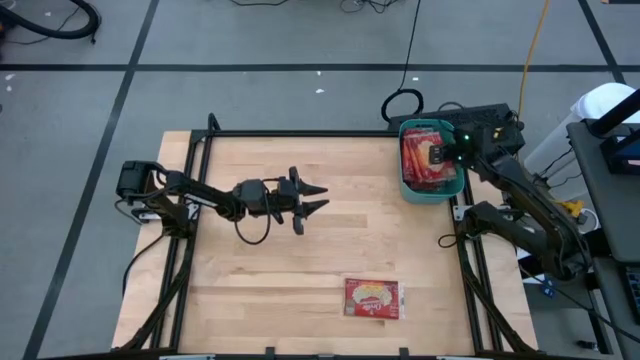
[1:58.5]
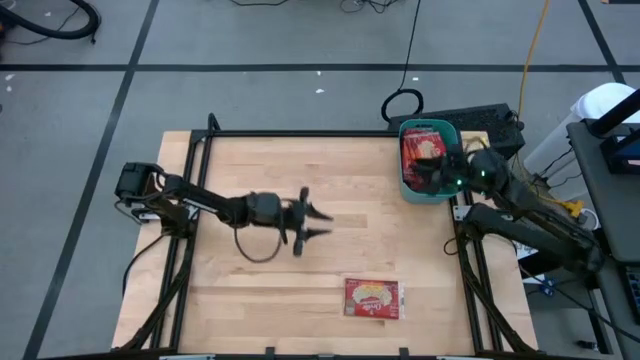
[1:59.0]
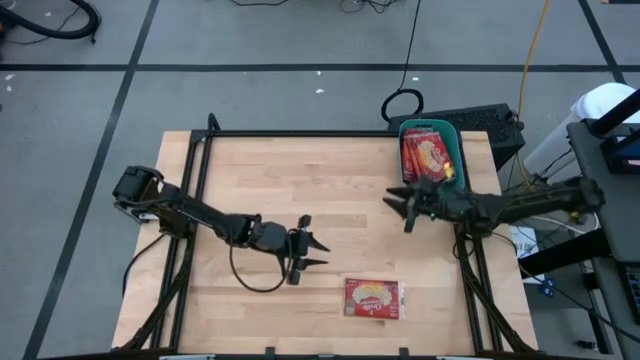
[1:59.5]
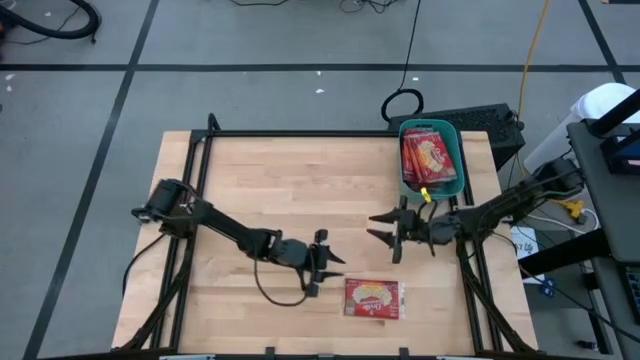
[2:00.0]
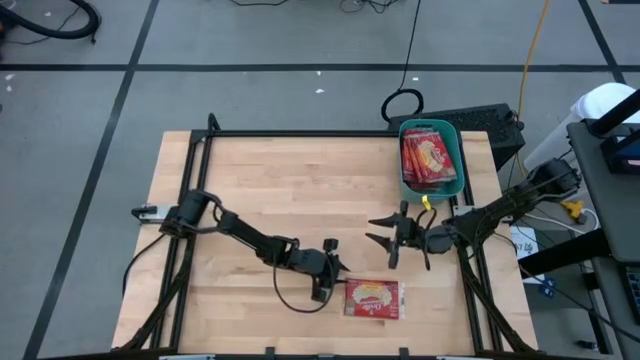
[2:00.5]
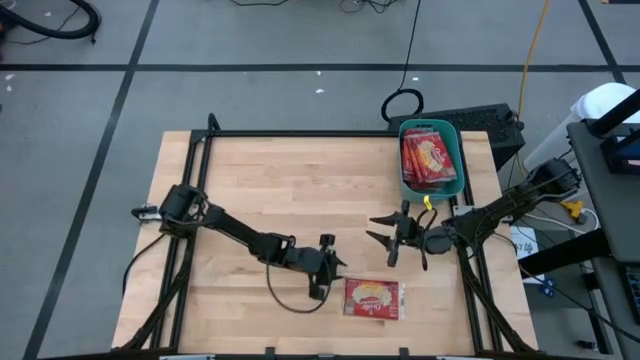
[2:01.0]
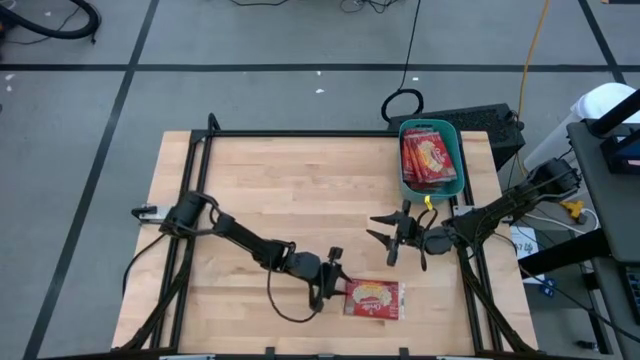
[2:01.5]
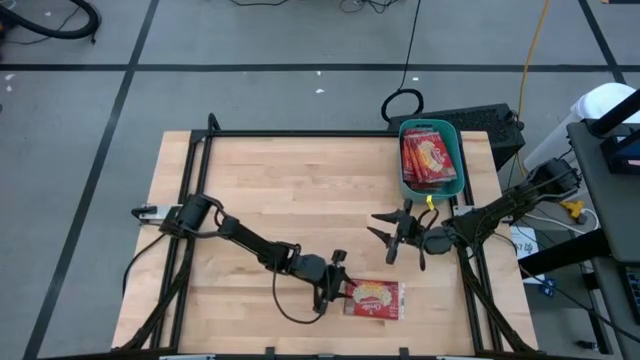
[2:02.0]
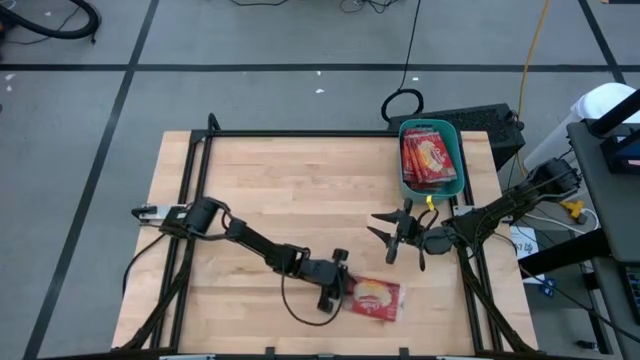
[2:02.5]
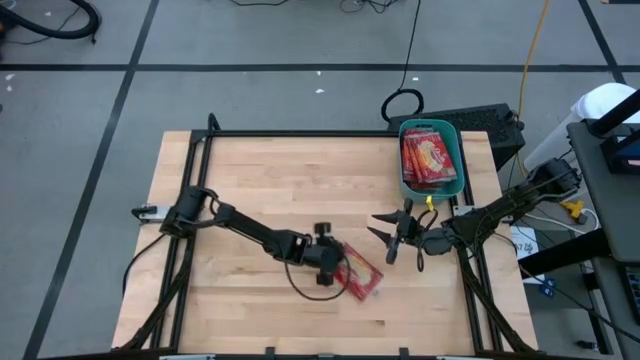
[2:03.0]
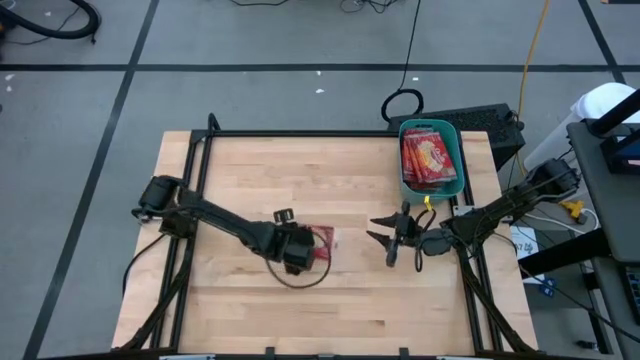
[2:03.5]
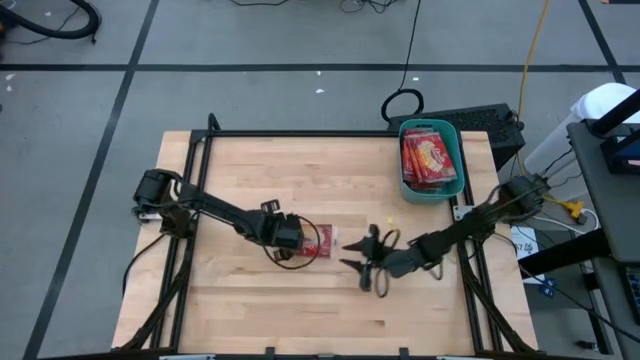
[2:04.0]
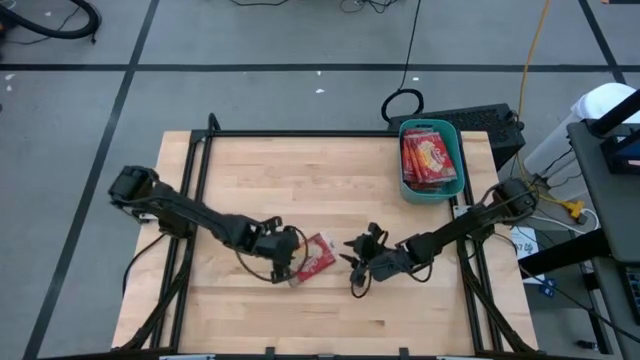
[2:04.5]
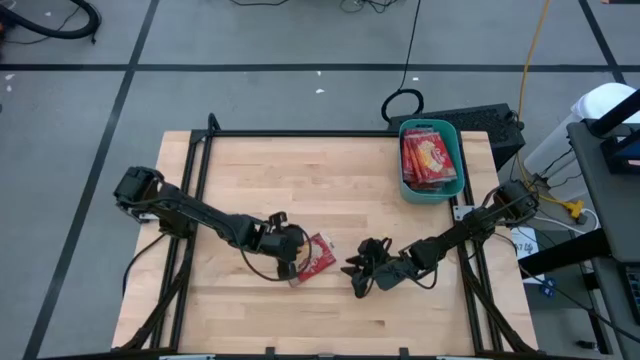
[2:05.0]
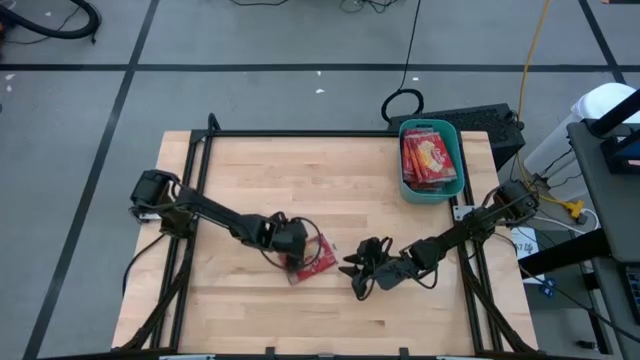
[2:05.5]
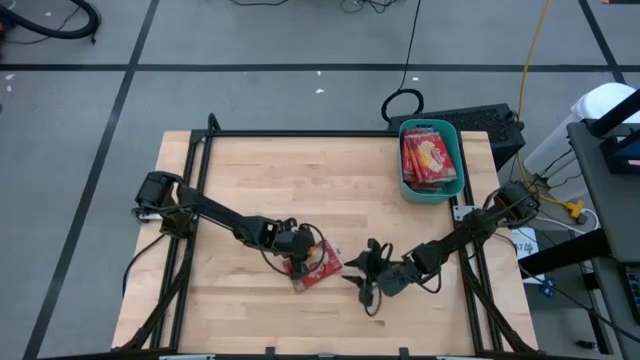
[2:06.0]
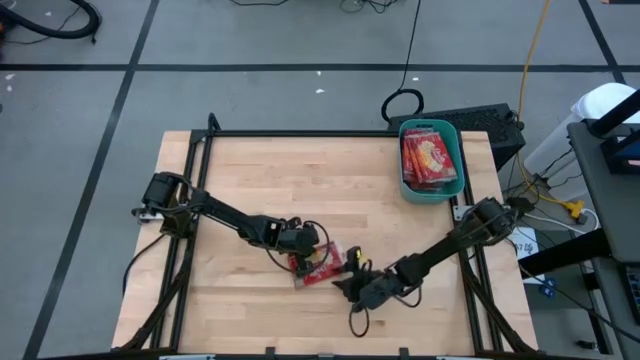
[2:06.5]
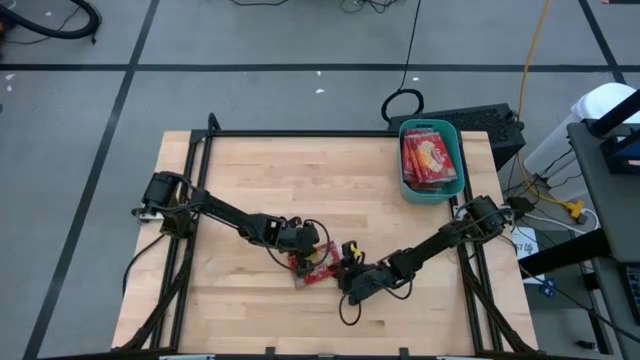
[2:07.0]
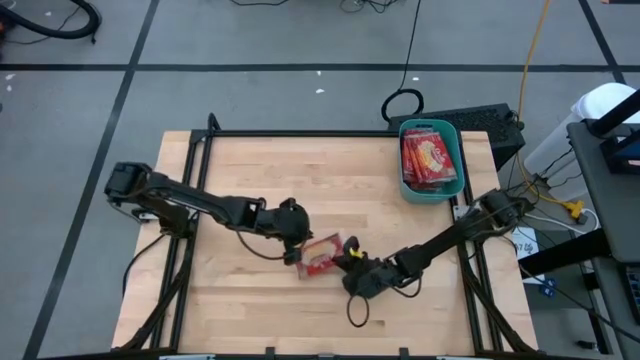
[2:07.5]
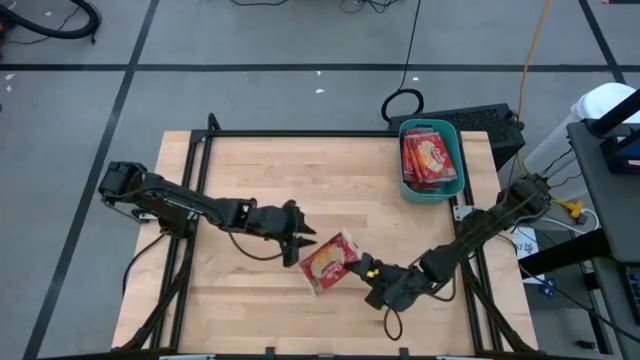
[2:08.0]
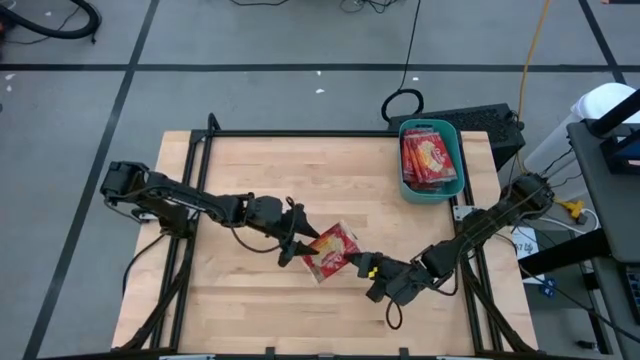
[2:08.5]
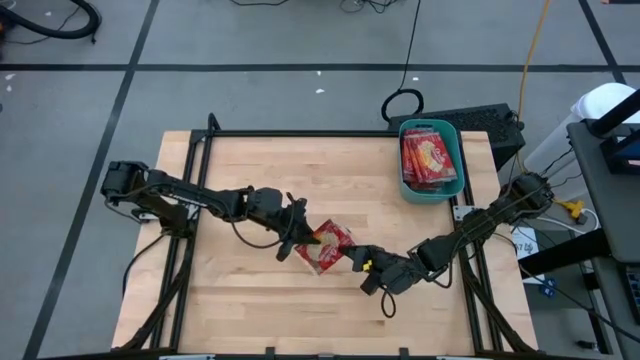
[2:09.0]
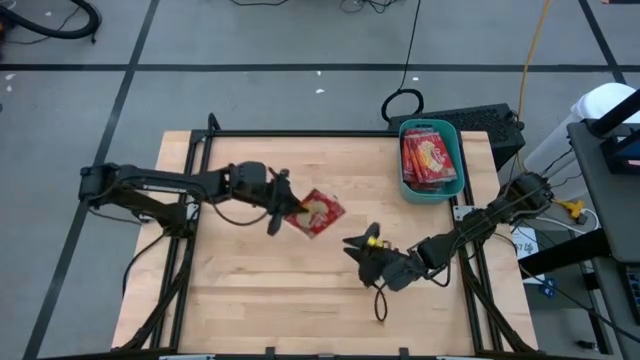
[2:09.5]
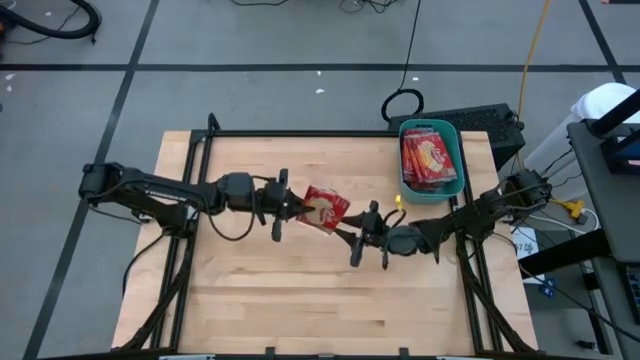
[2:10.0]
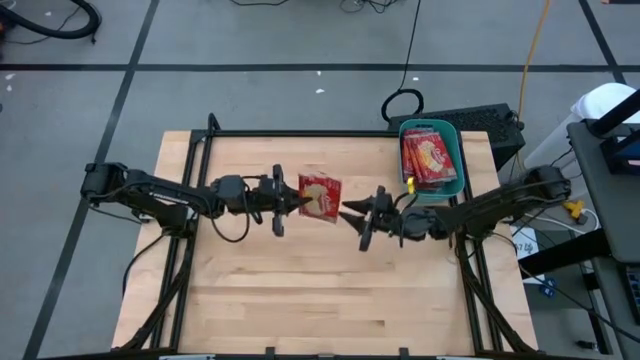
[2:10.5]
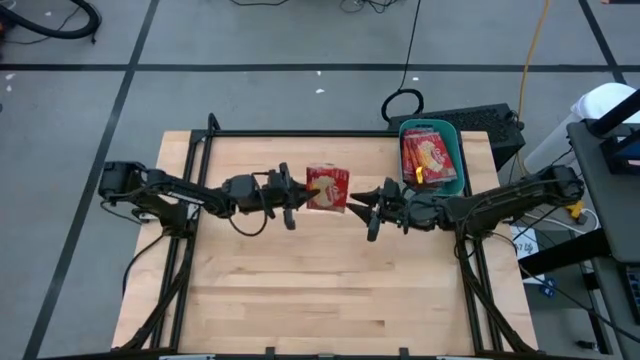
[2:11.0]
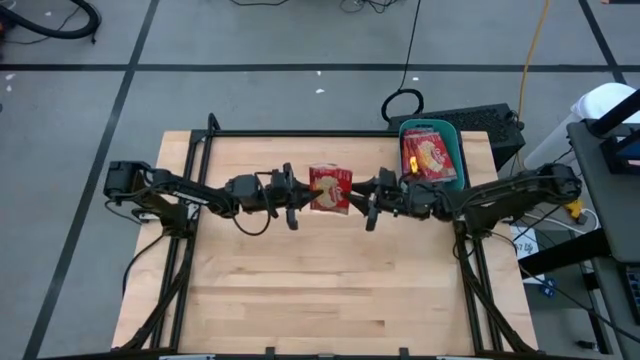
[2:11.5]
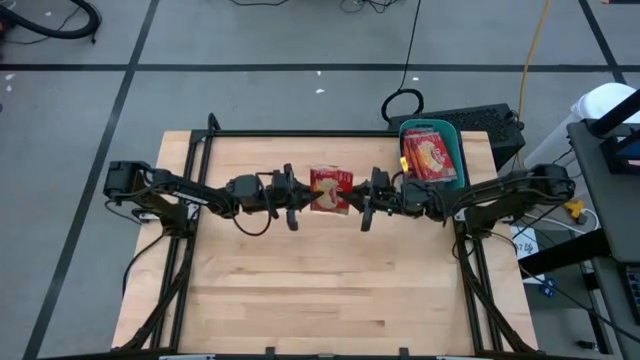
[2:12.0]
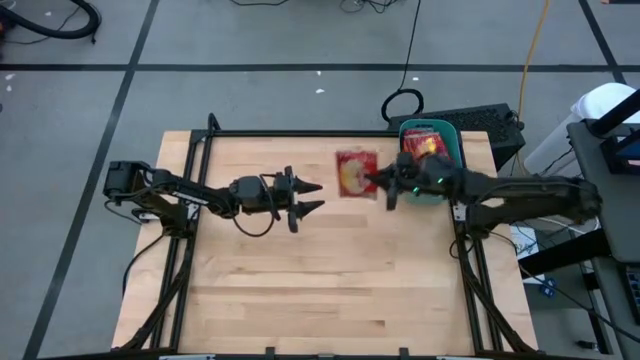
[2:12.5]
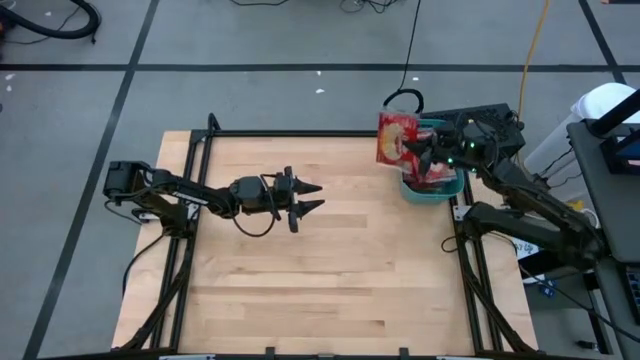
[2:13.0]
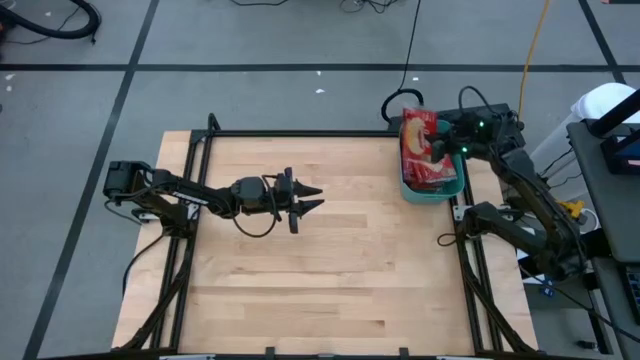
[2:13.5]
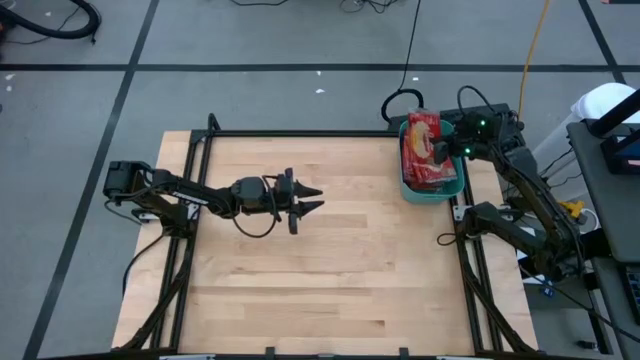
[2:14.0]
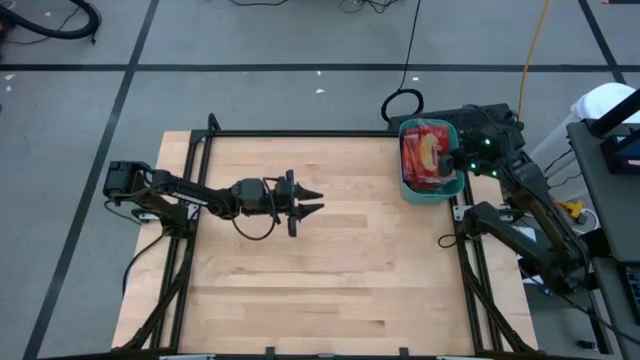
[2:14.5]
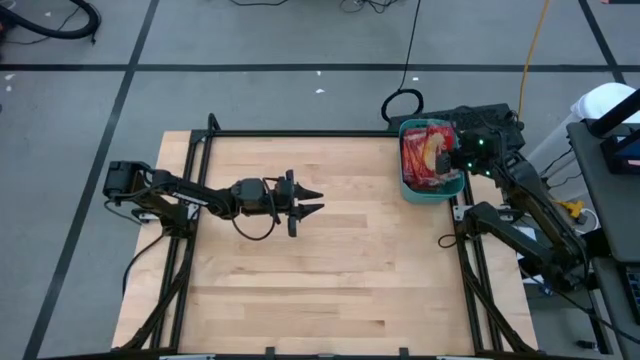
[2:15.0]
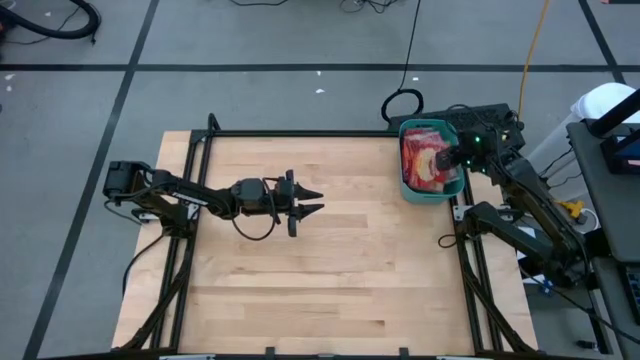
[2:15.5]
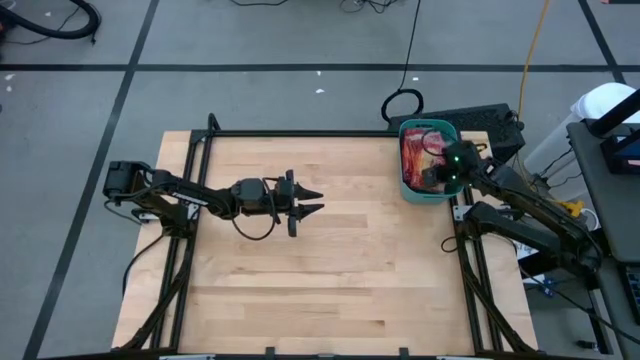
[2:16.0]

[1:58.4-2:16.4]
Task: Sort popcorn bags into baskets
Put the red popcorn bag into the green bin

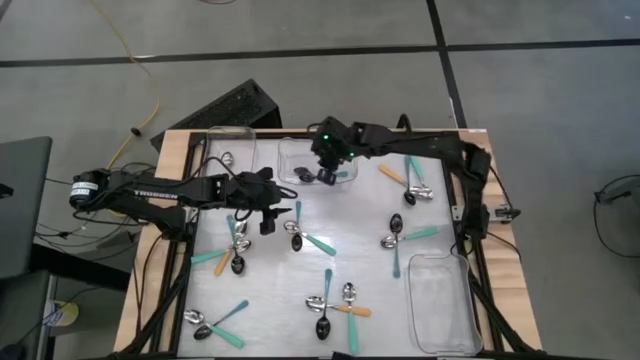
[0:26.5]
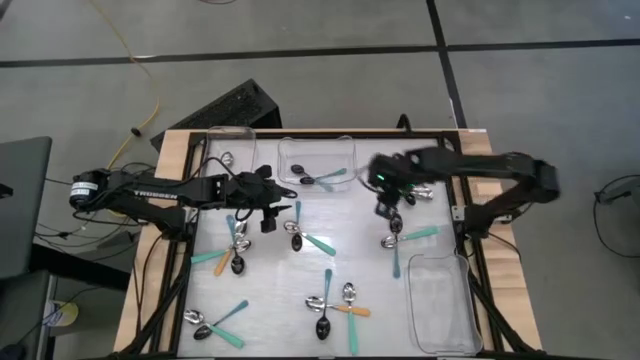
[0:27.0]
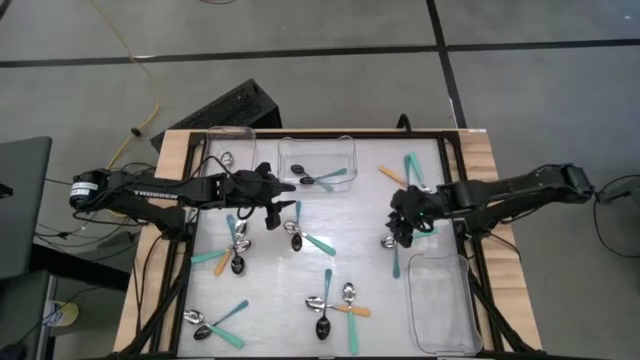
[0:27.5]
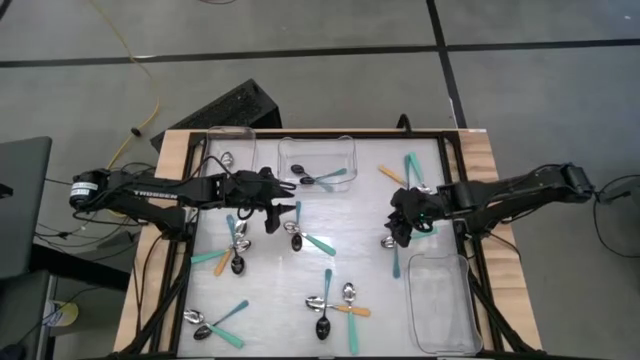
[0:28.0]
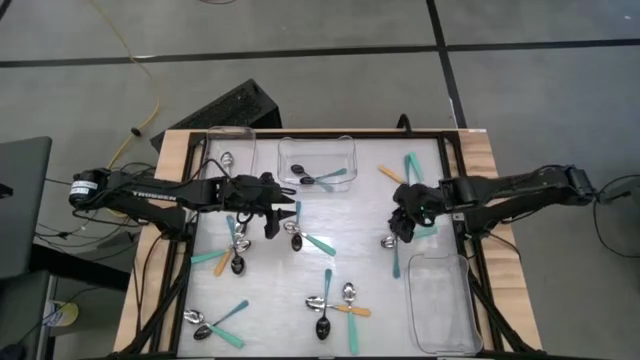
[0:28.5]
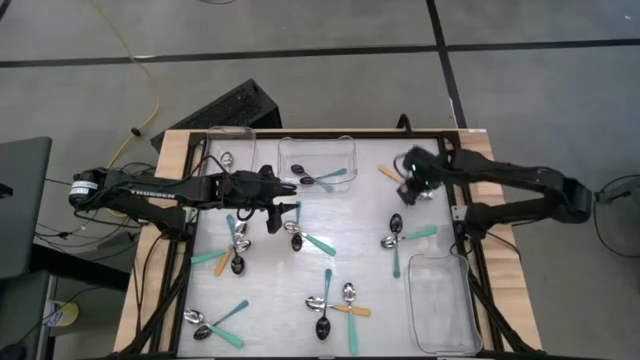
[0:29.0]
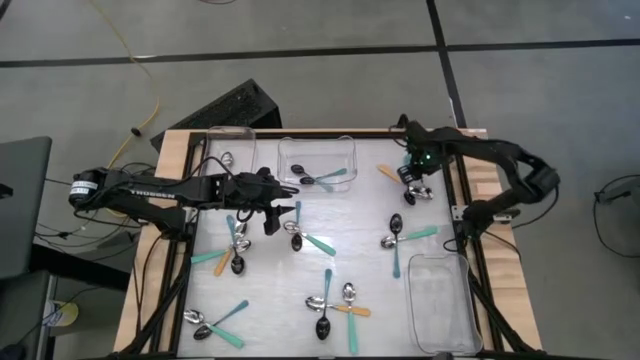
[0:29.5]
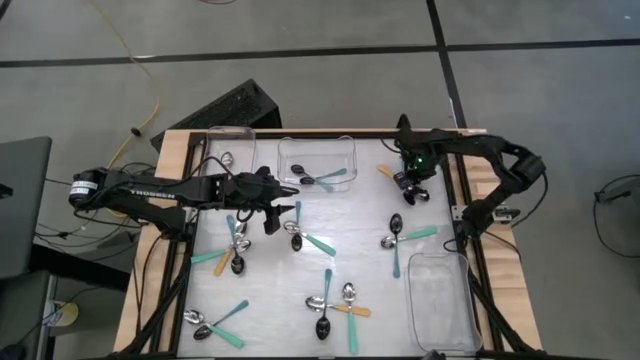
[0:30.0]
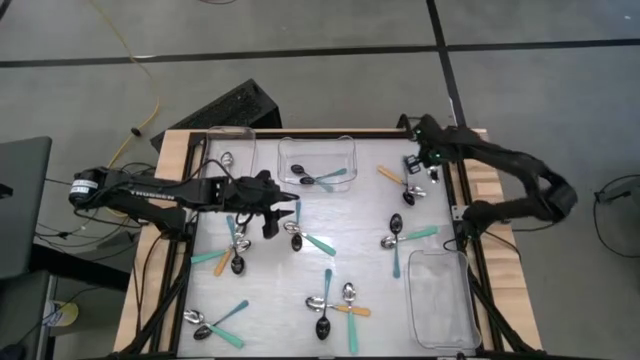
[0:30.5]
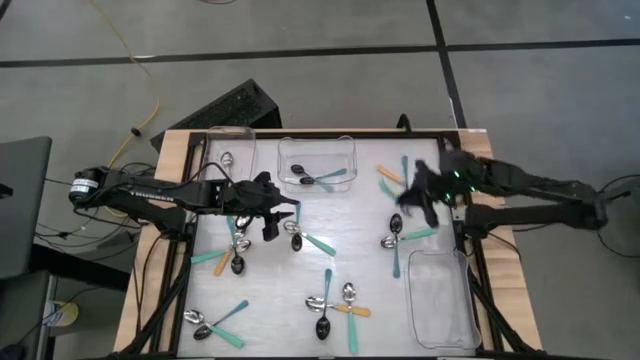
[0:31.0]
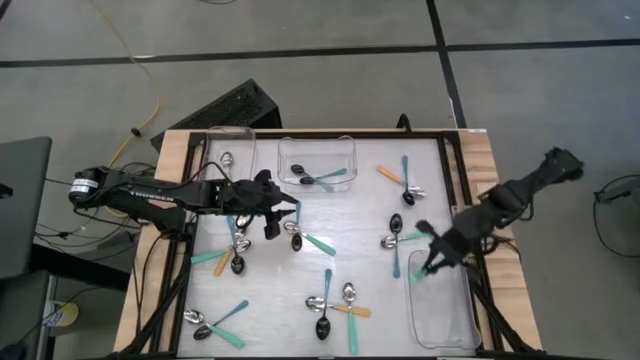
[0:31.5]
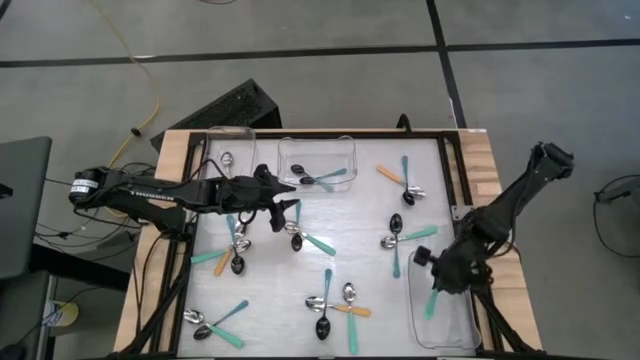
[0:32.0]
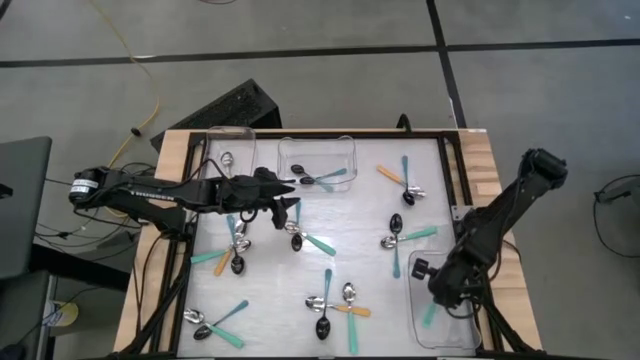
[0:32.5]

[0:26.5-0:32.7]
Task: Sort silverware by color (type)
Put the green spoon into the bottom transparent bin
